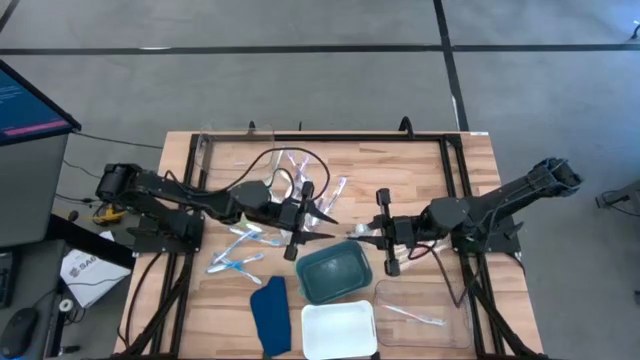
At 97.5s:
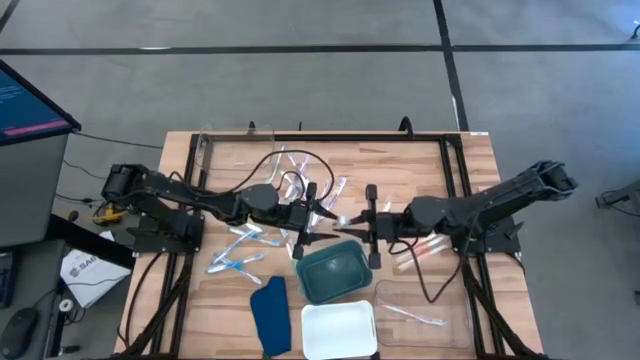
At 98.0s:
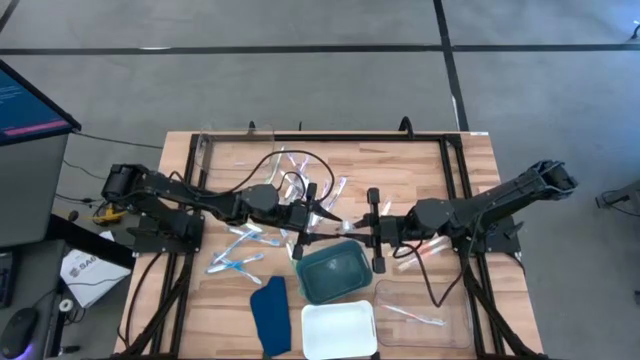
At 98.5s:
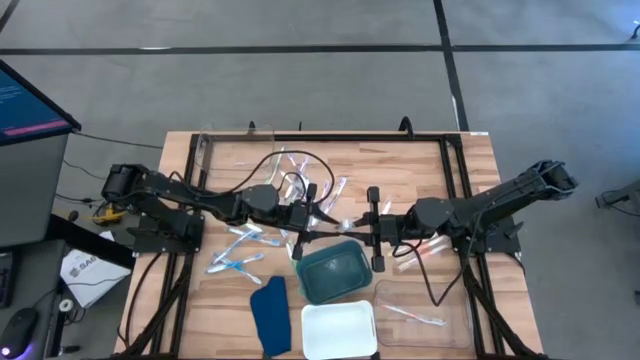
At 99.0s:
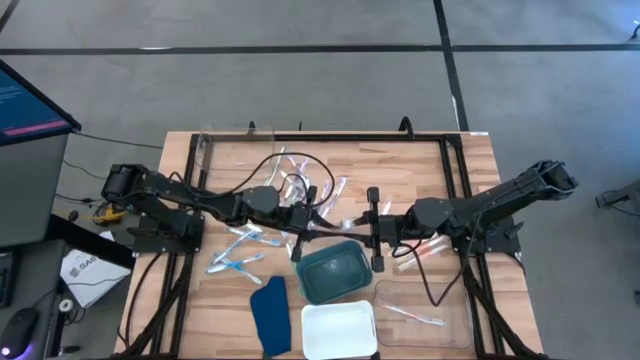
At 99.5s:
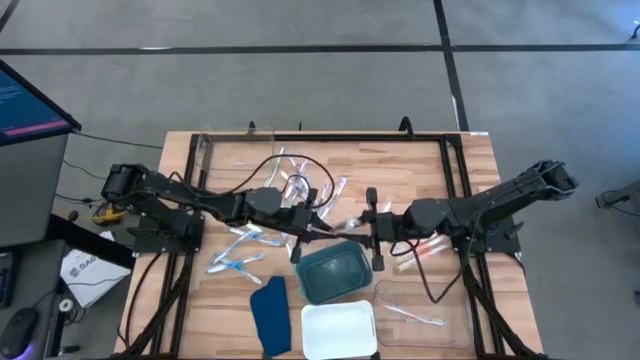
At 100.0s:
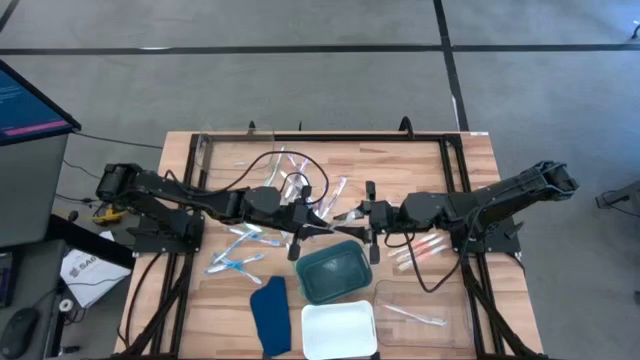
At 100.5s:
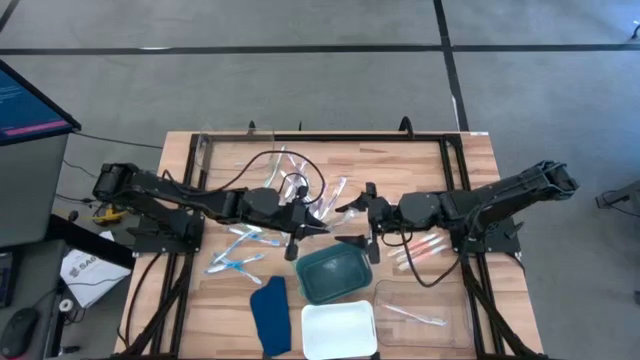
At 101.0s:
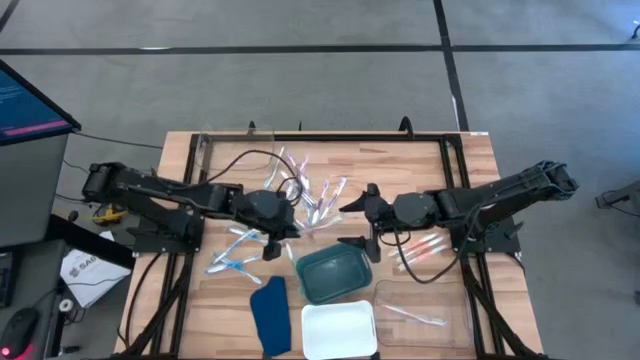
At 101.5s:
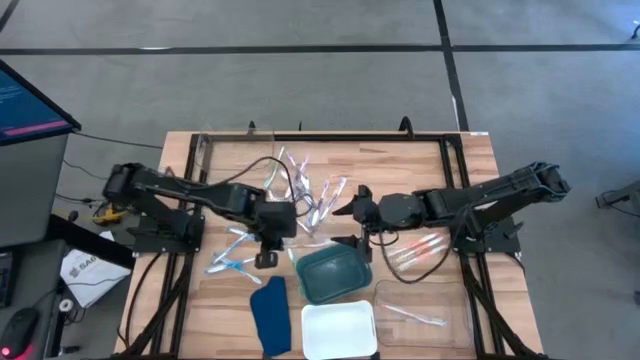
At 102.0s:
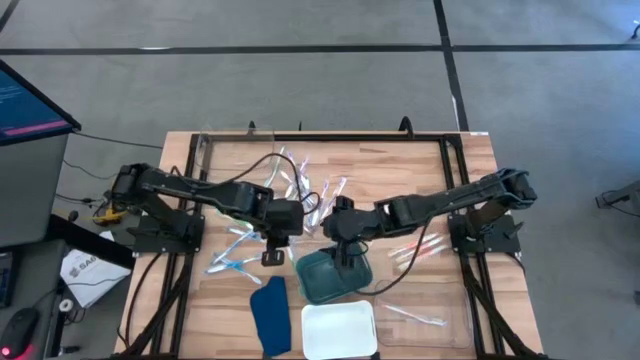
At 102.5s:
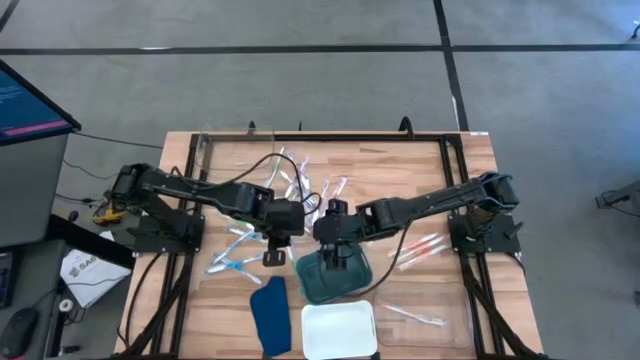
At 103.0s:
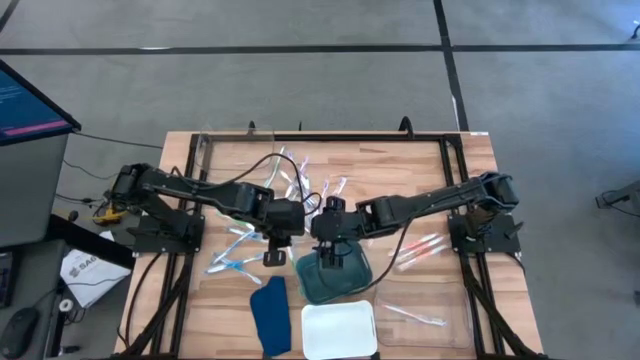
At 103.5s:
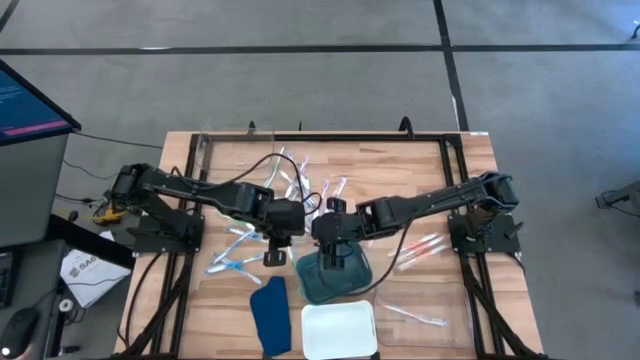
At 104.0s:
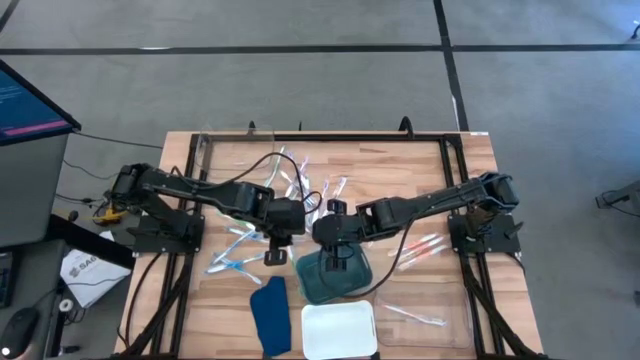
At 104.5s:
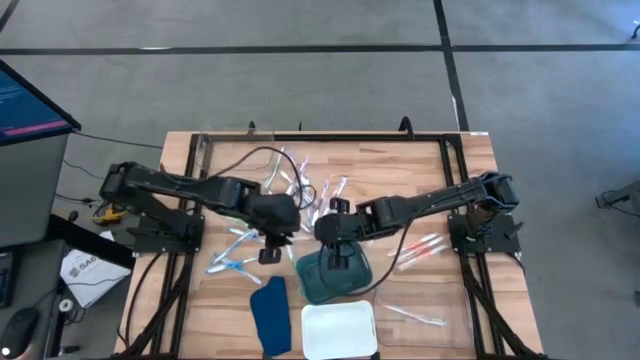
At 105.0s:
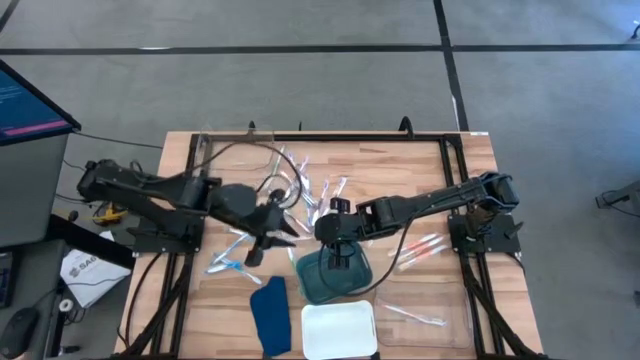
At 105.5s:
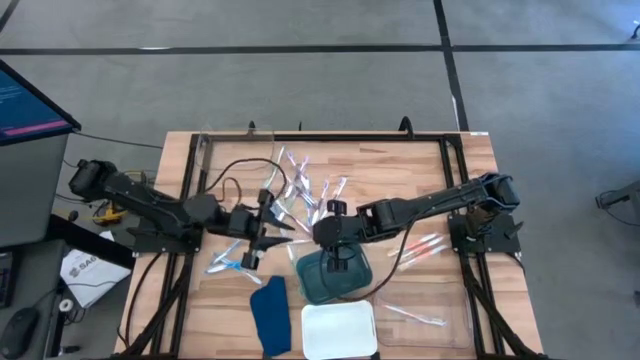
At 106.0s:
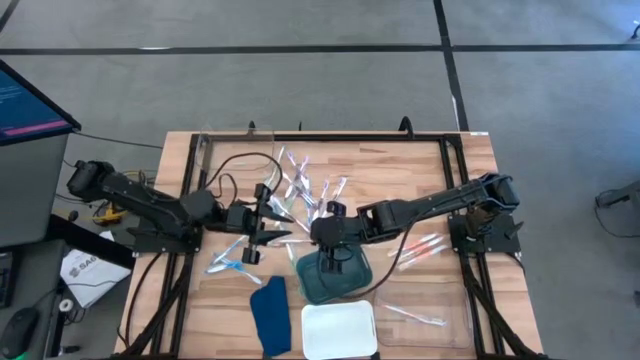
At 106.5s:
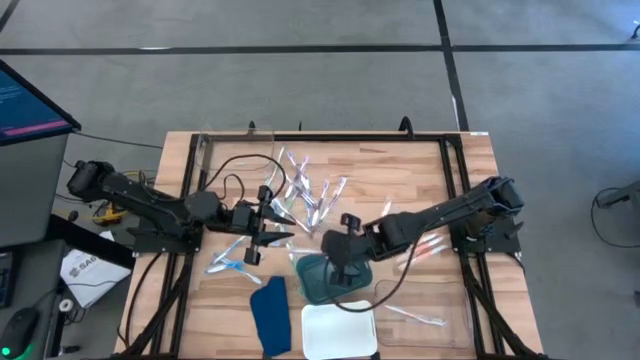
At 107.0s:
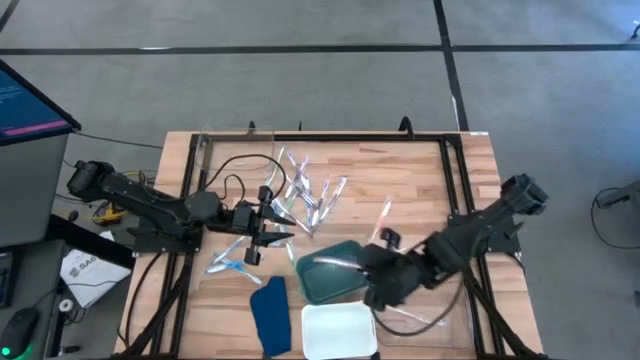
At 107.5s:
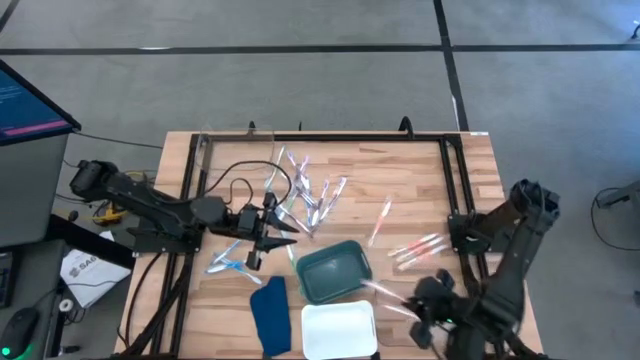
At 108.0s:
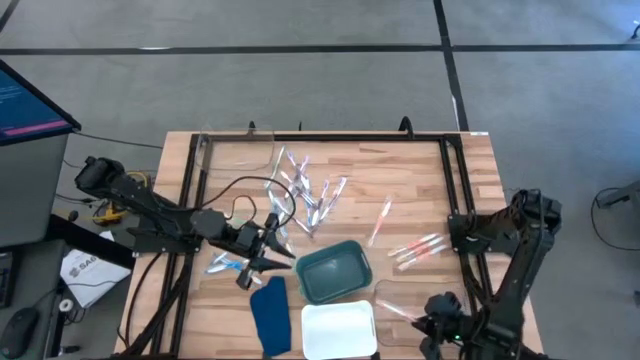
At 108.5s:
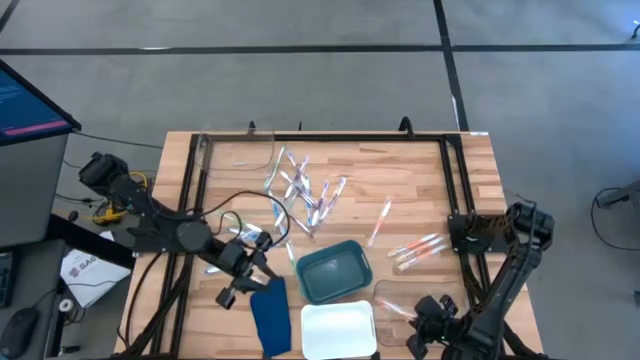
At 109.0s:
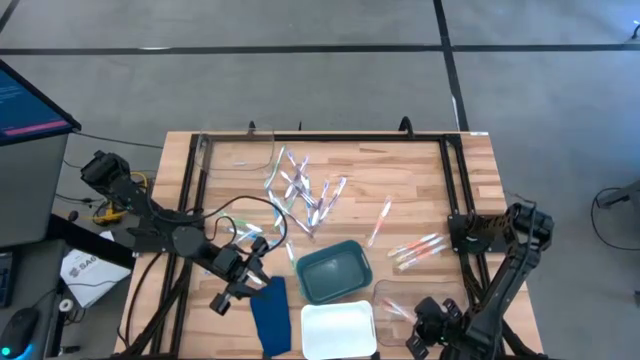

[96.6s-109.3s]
Task: Pick & Place Toothbrushes
Put the orange toothbrush into the bottom transparent bin

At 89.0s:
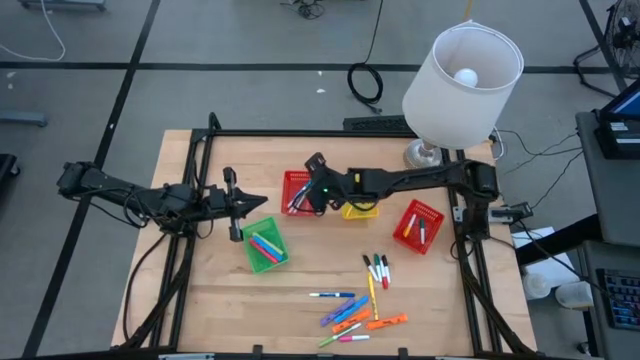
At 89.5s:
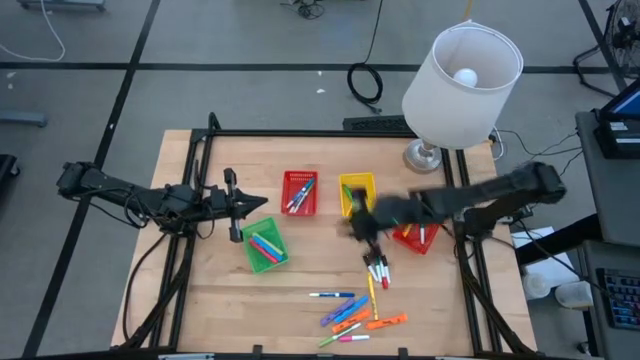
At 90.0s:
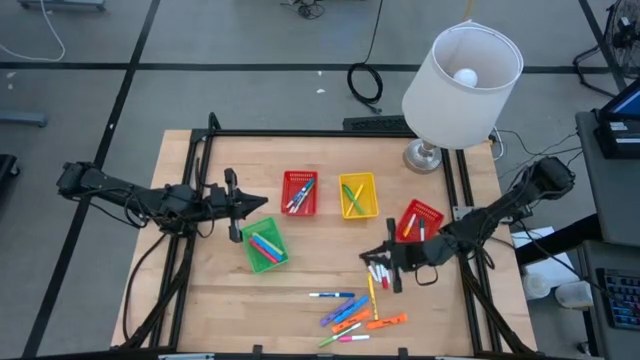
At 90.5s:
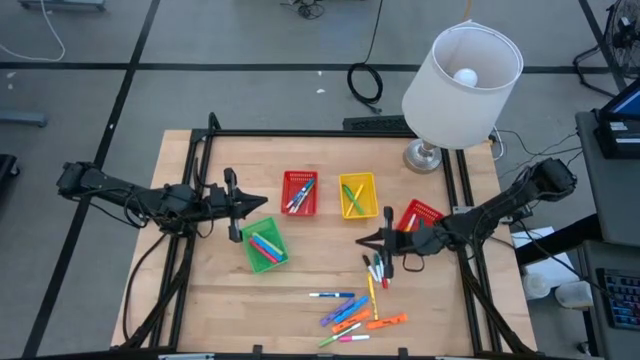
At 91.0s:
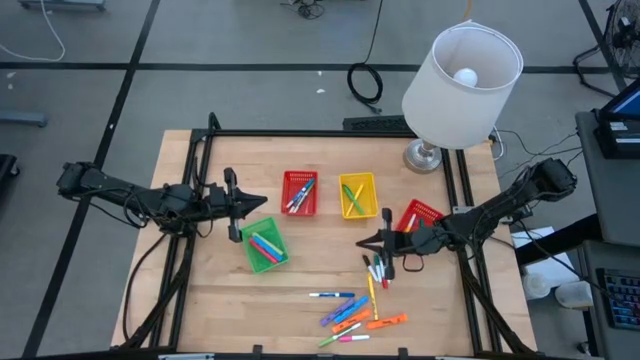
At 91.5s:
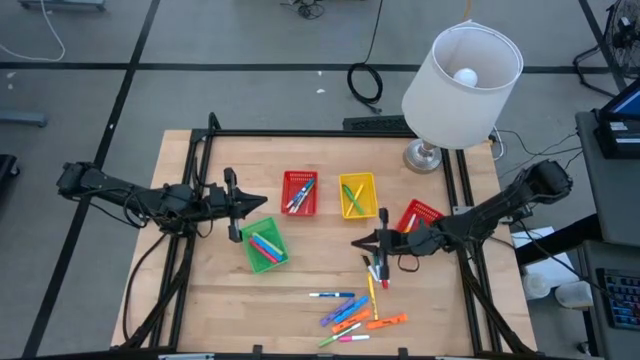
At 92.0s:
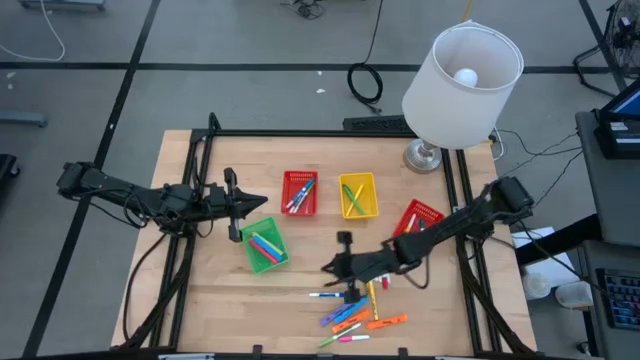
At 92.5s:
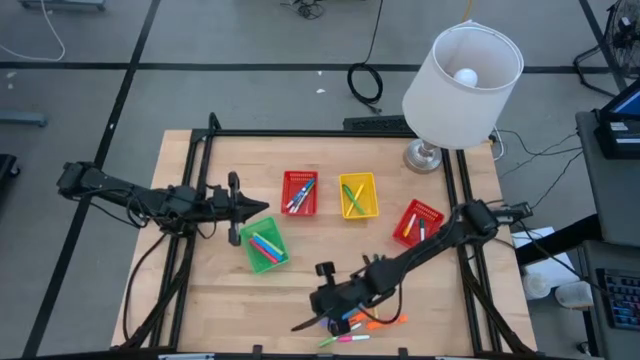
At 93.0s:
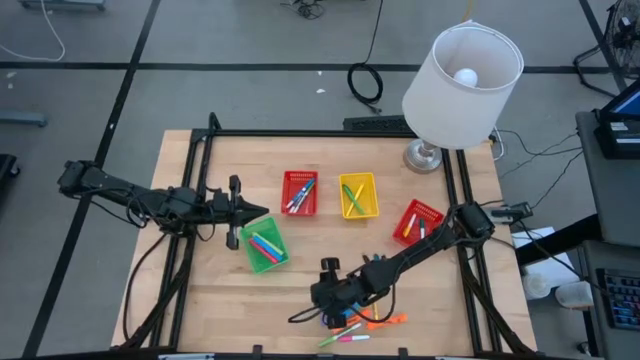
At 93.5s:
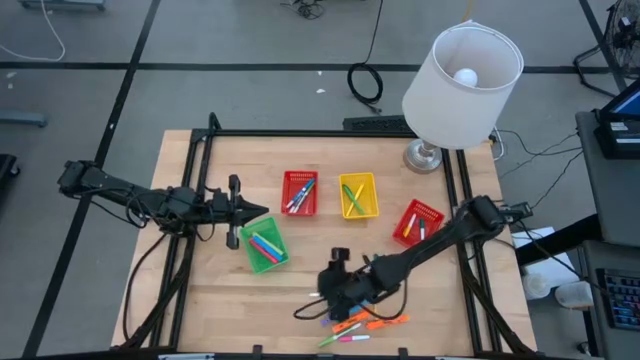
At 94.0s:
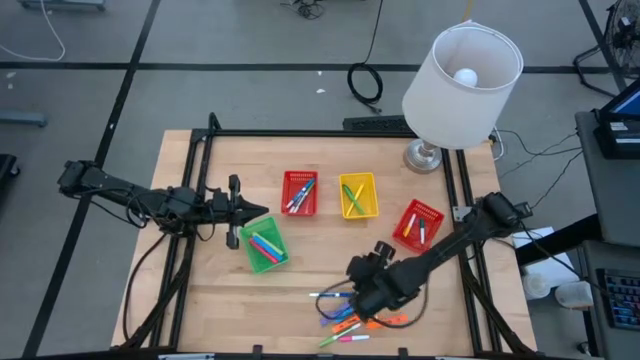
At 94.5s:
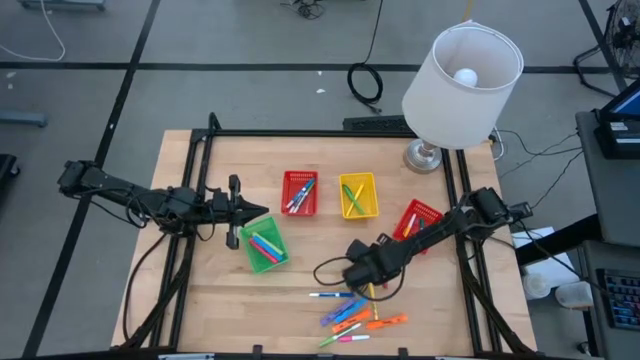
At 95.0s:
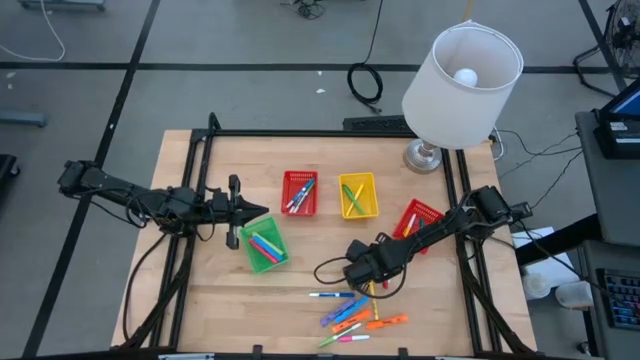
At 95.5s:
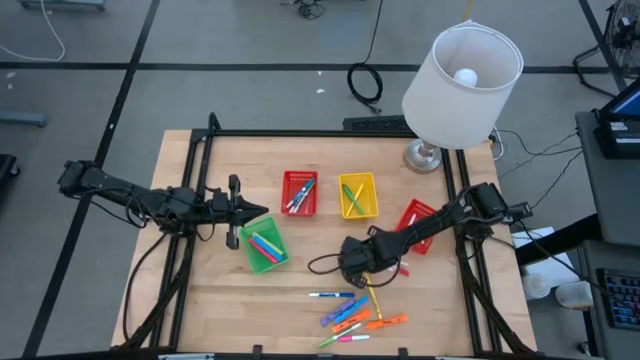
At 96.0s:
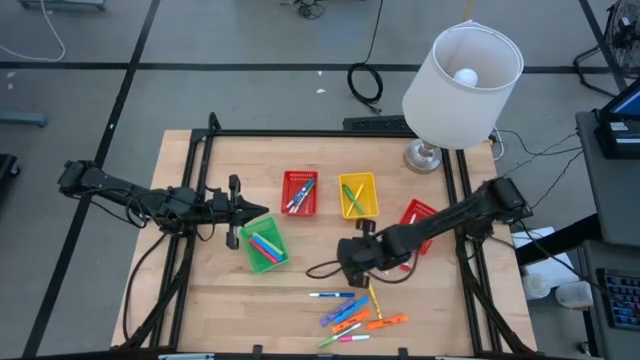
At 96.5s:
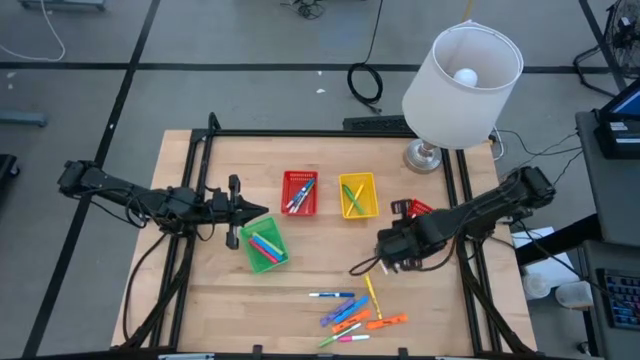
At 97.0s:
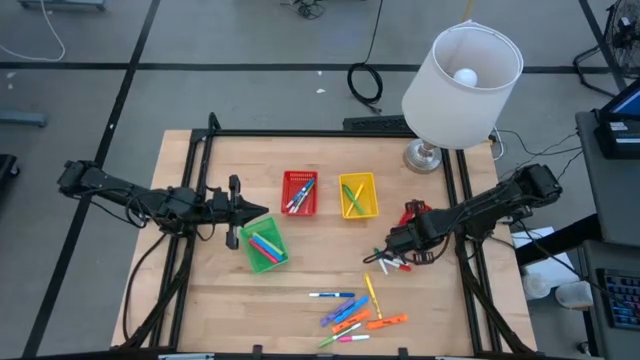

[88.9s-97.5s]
Task: Pick & Place Markers
Put the left black highlighter into the right red bin
